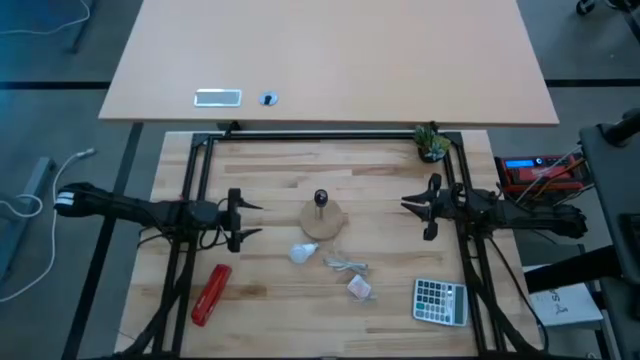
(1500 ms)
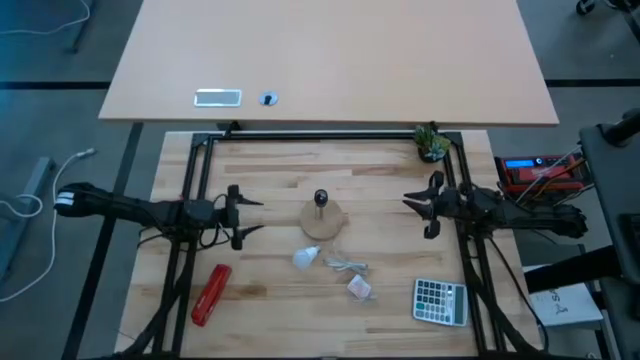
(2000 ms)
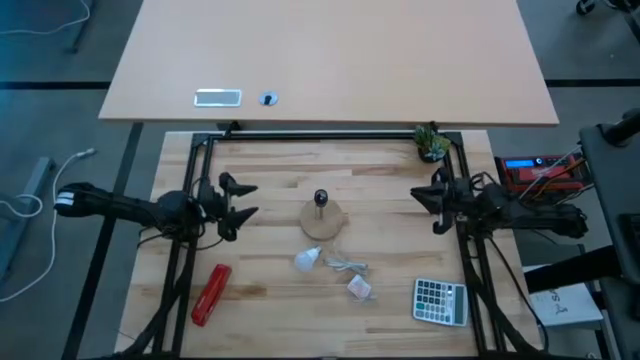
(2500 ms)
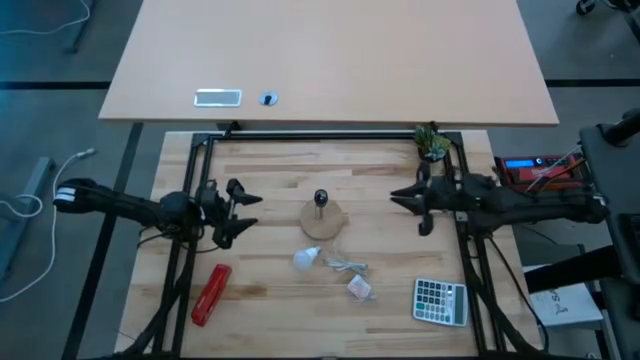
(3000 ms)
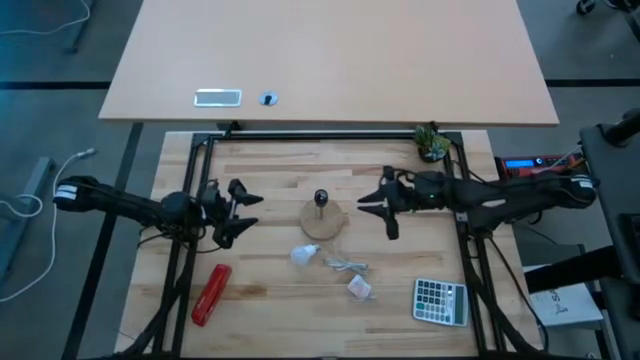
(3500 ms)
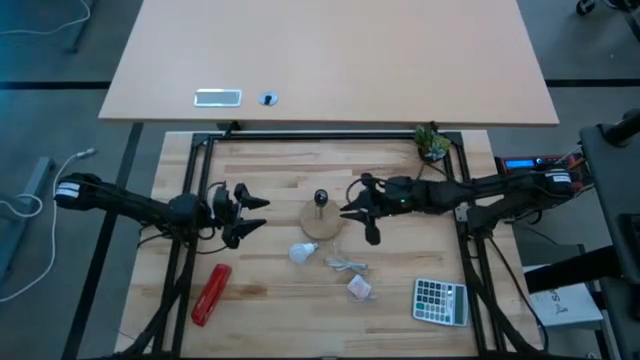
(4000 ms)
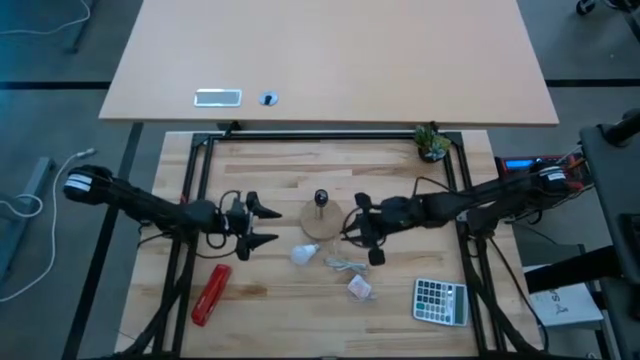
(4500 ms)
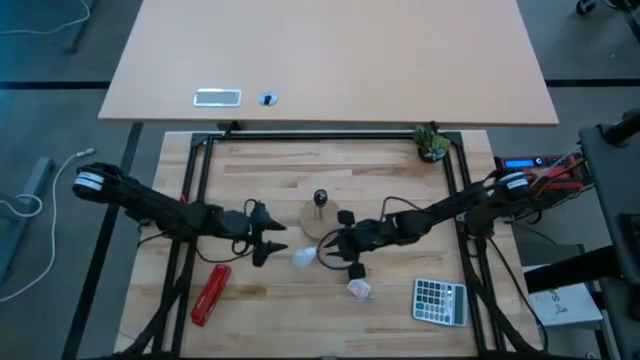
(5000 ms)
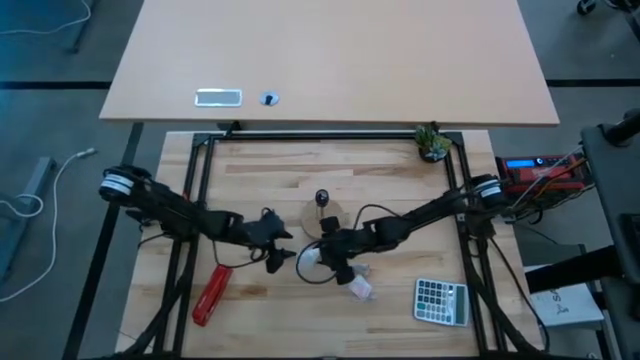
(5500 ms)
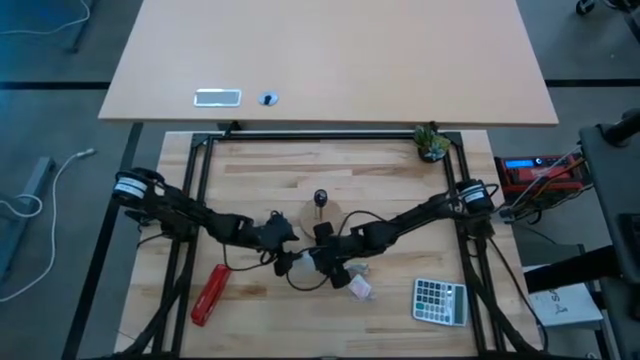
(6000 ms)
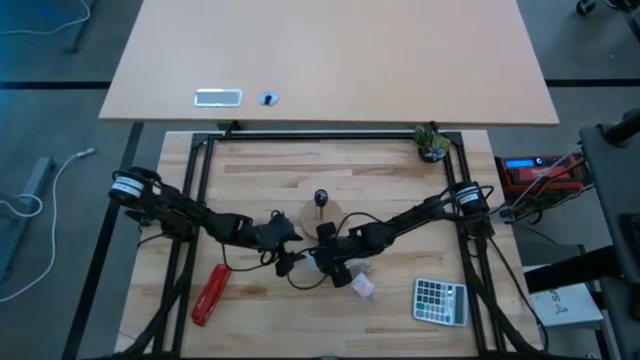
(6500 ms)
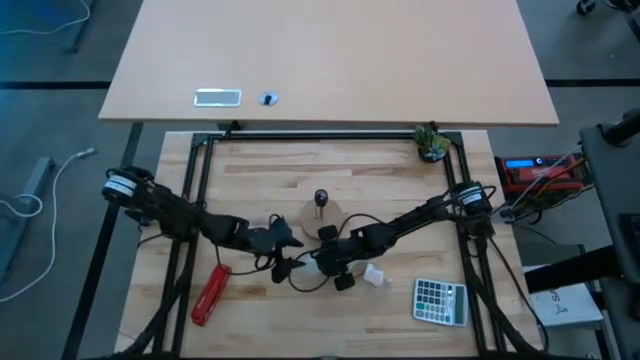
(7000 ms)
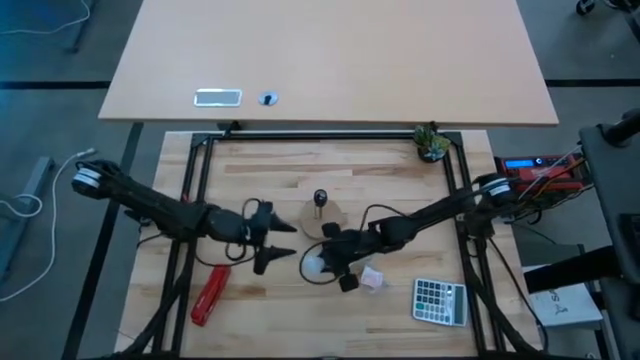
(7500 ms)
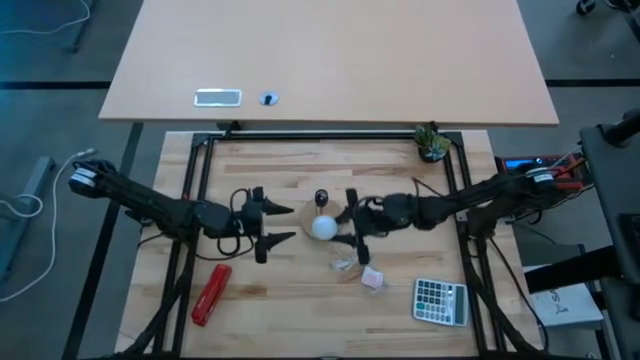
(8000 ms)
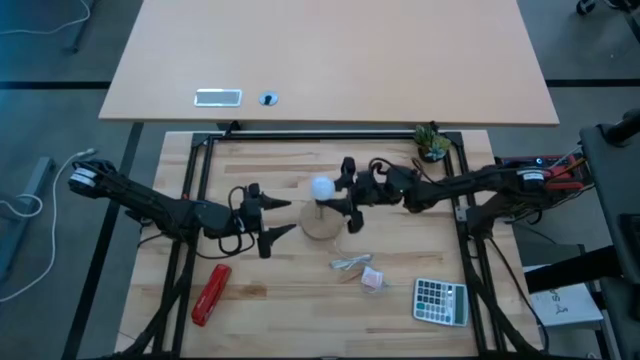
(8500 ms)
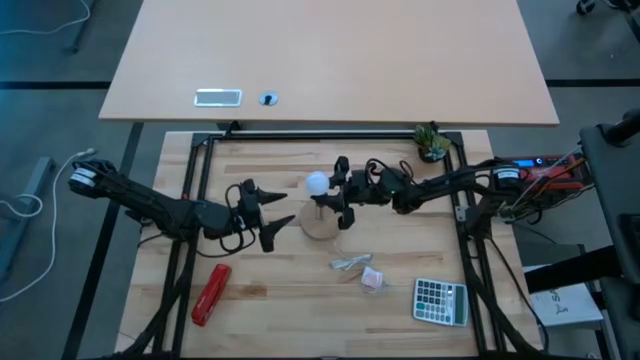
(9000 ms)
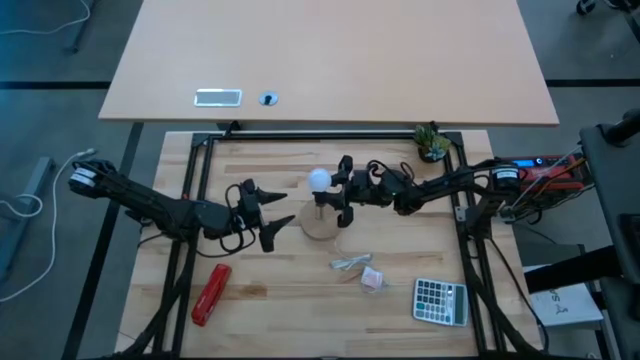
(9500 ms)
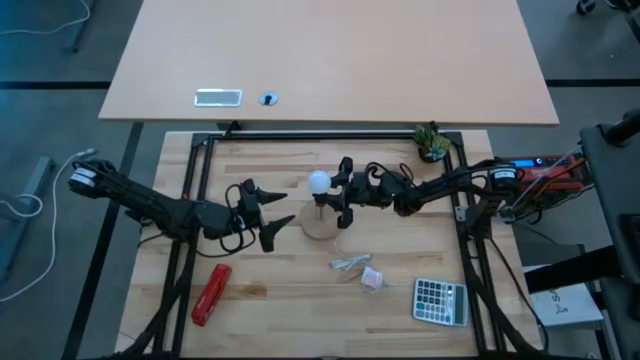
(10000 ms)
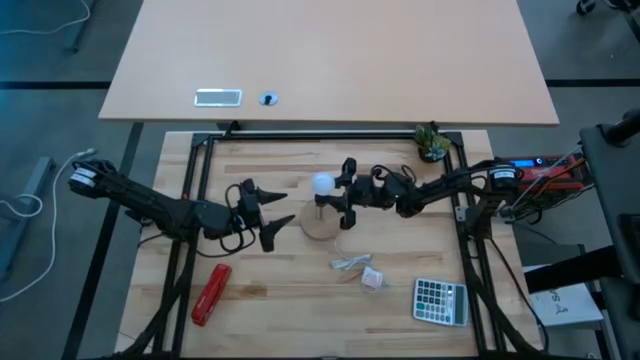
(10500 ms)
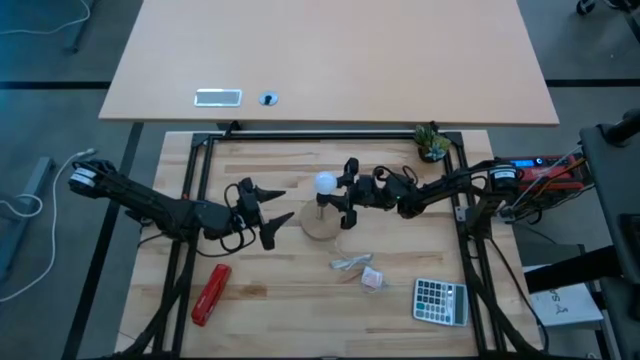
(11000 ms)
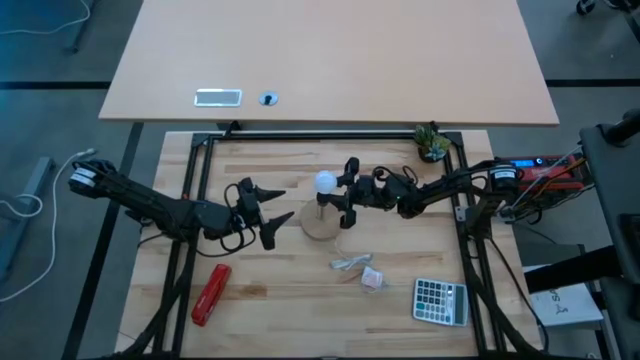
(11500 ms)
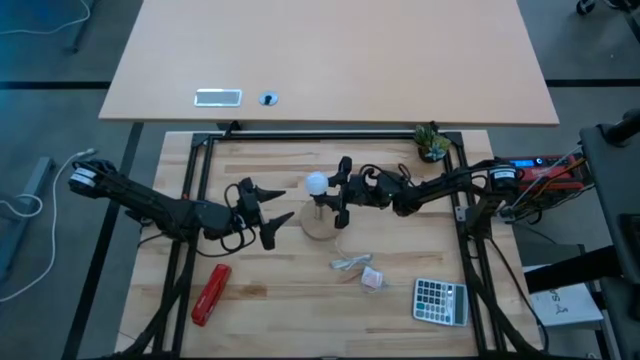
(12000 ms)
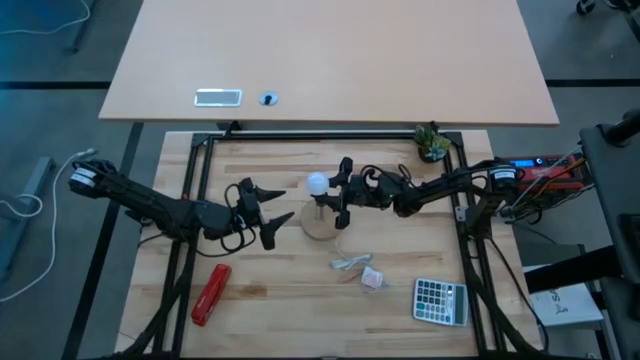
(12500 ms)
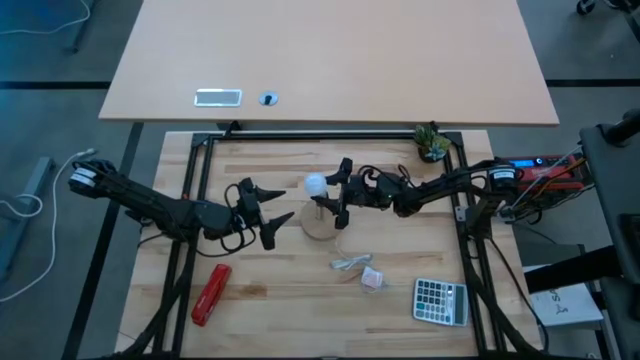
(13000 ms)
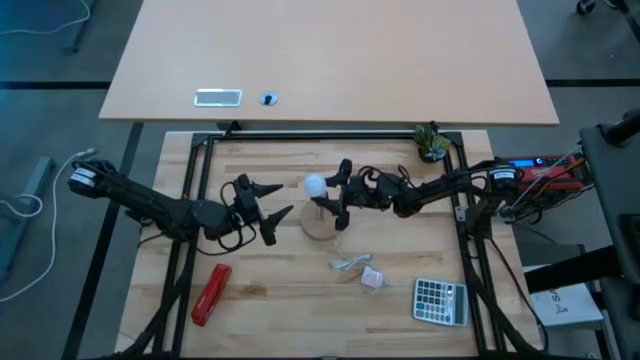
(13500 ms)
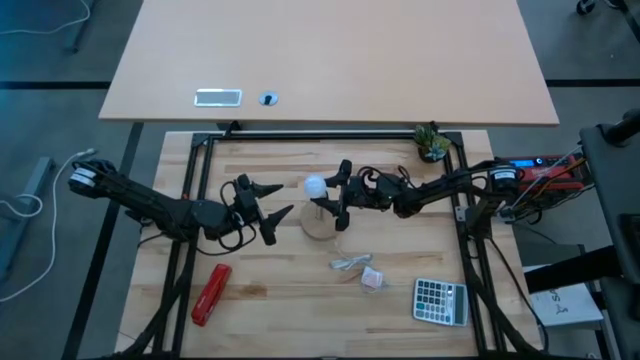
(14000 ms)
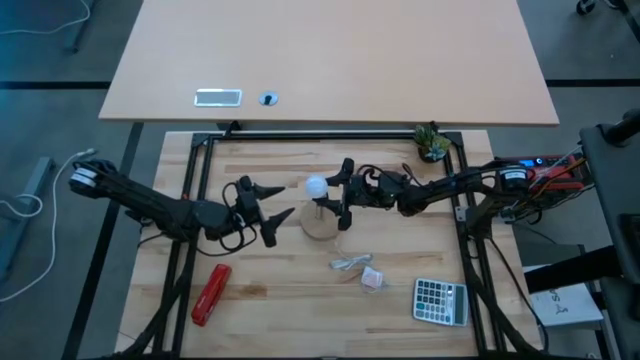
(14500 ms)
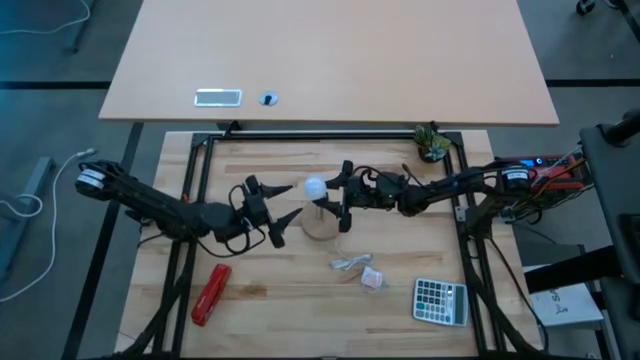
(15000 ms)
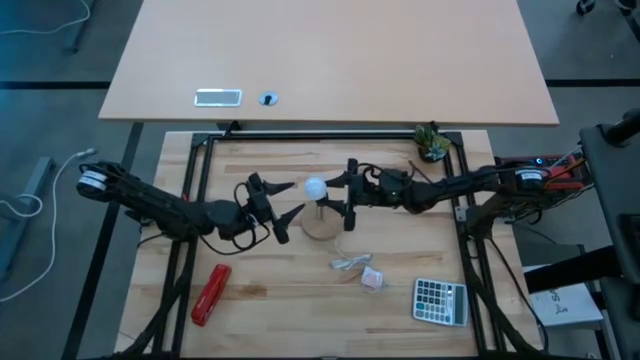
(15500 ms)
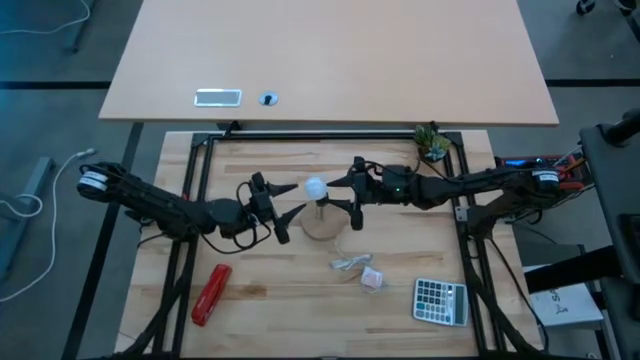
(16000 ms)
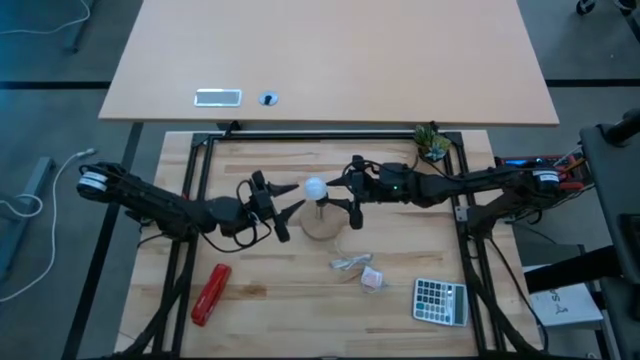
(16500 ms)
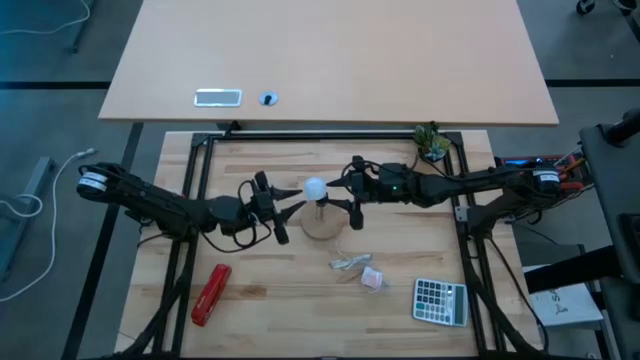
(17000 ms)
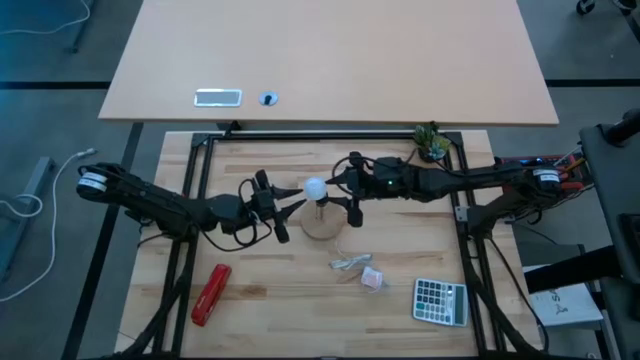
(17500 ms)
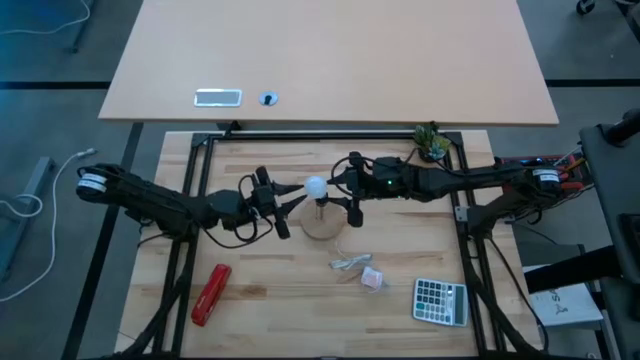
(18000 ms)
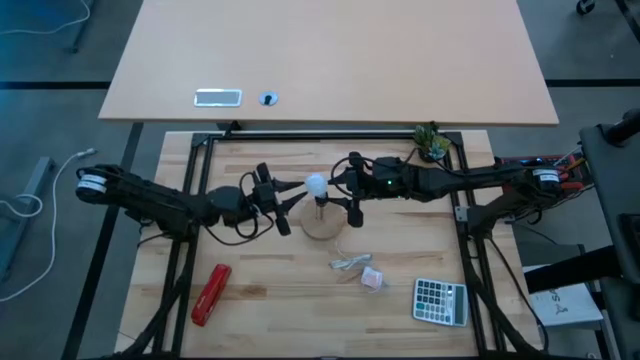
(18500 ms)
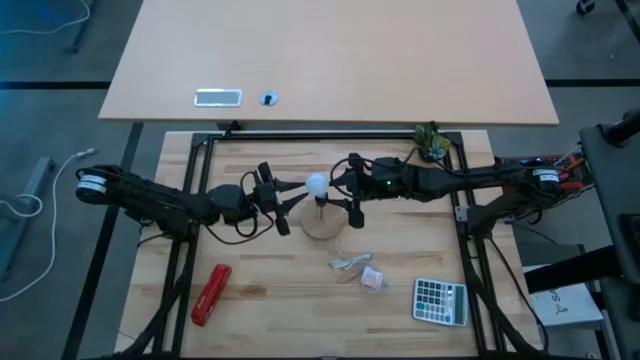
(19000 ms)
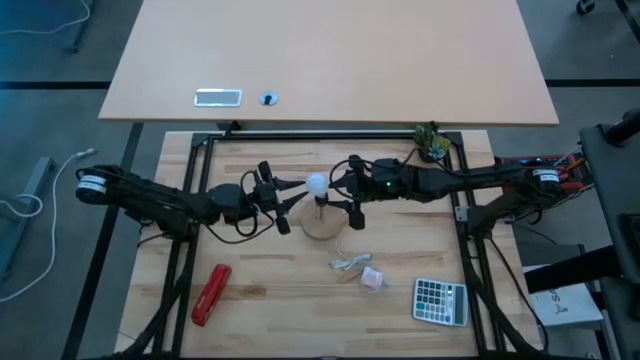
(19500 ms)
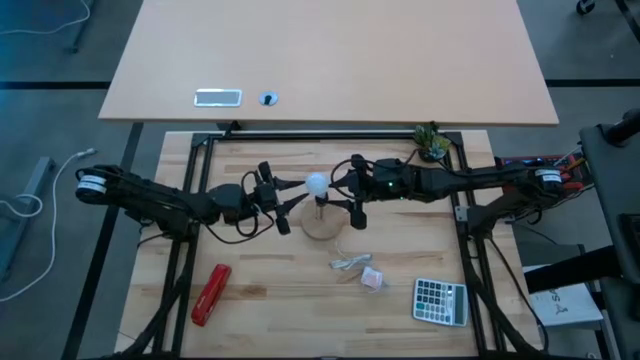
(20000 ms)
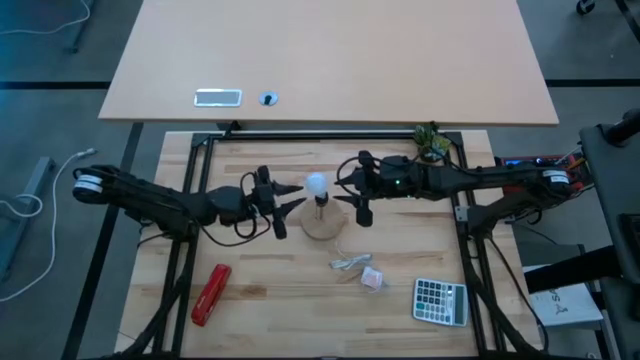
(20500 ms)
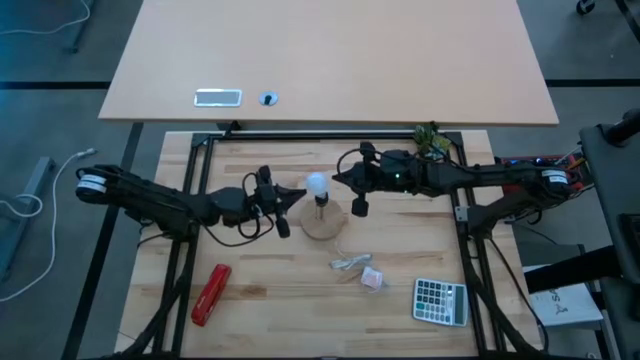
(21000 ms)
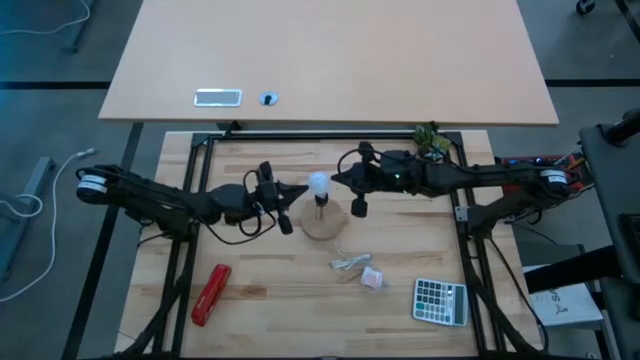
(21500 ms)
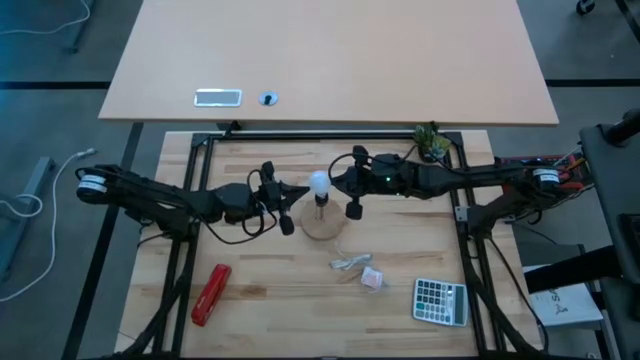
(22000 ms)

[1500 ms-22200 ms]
Task: Screw lightbulb
Insert the lightbulb into the lamp
